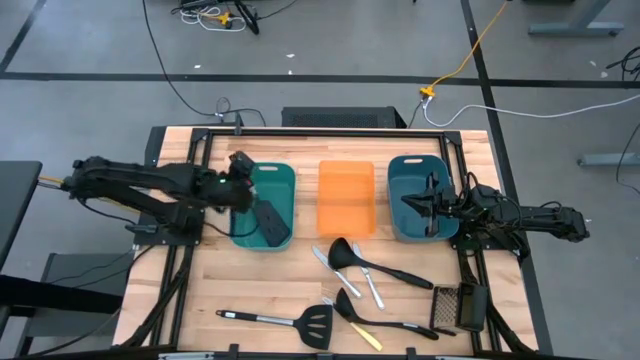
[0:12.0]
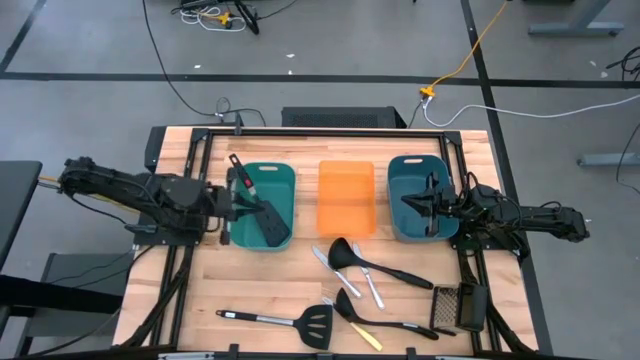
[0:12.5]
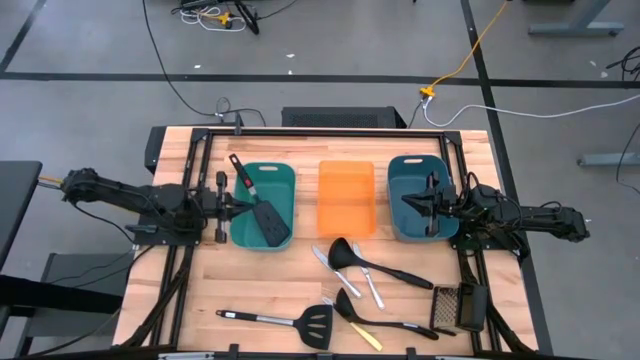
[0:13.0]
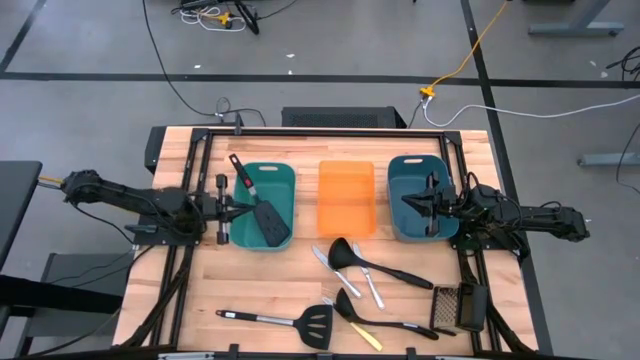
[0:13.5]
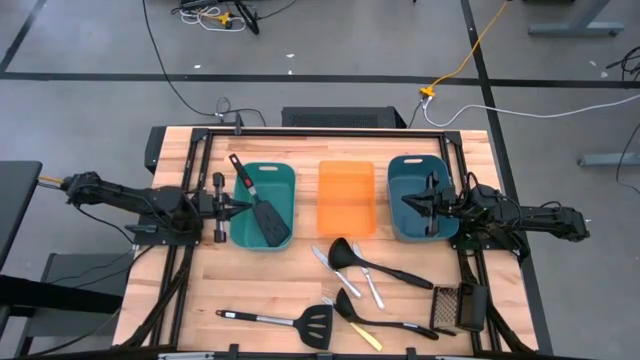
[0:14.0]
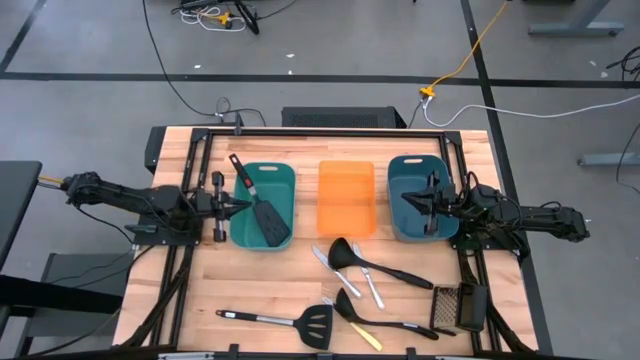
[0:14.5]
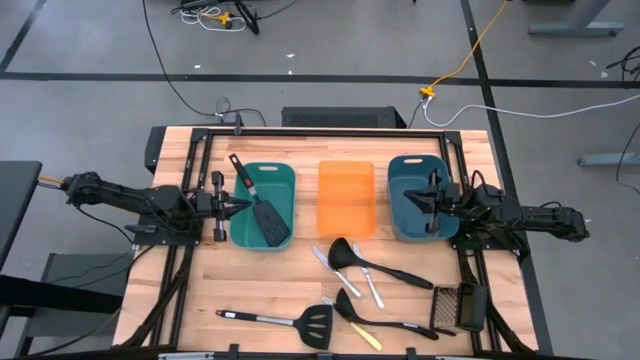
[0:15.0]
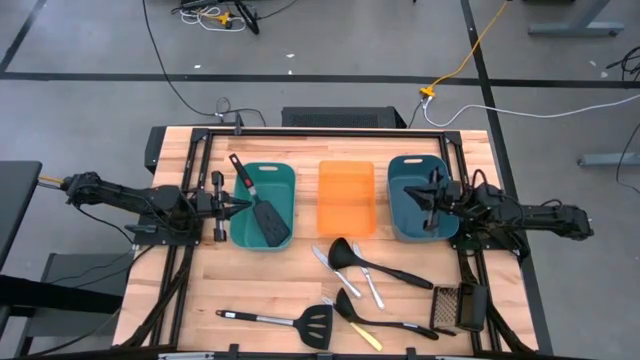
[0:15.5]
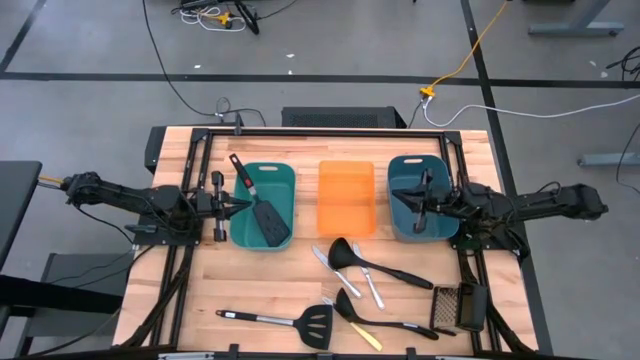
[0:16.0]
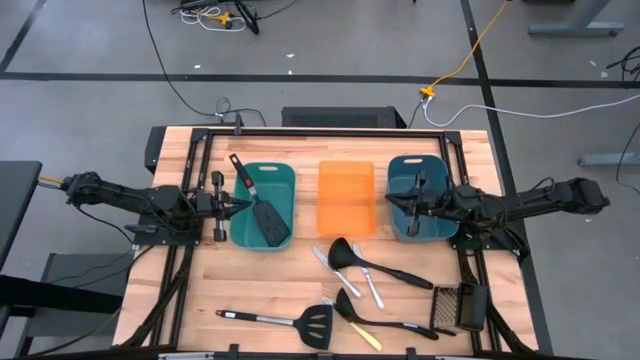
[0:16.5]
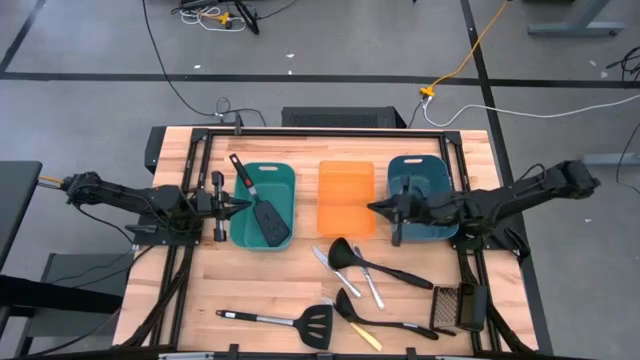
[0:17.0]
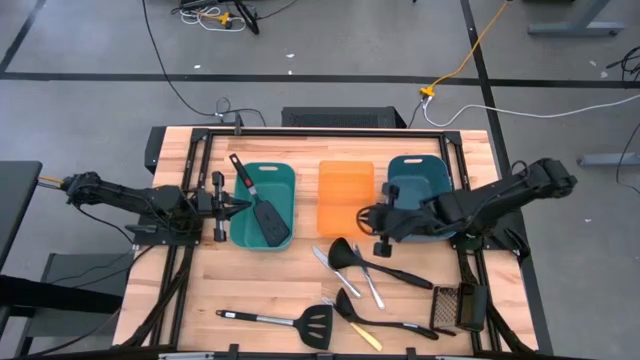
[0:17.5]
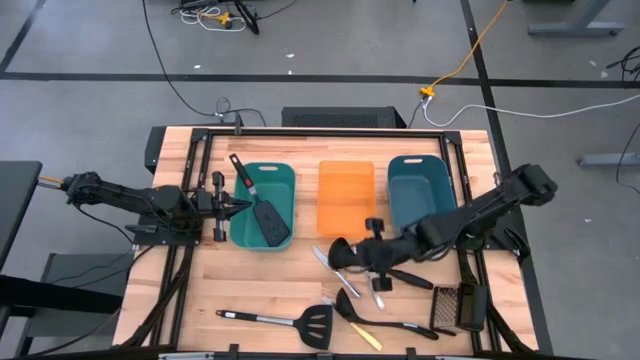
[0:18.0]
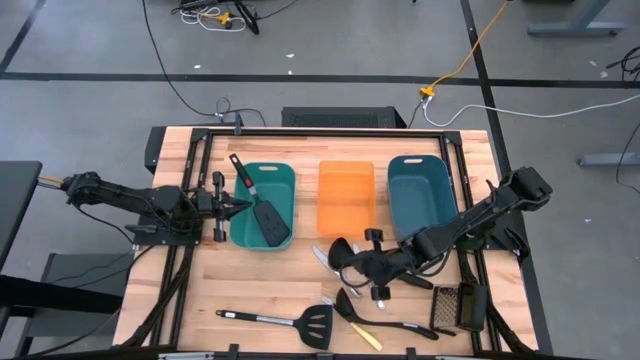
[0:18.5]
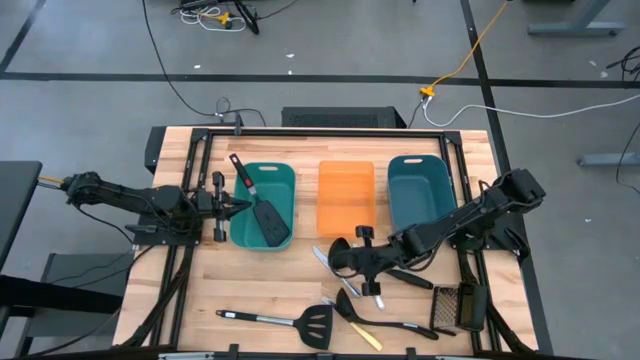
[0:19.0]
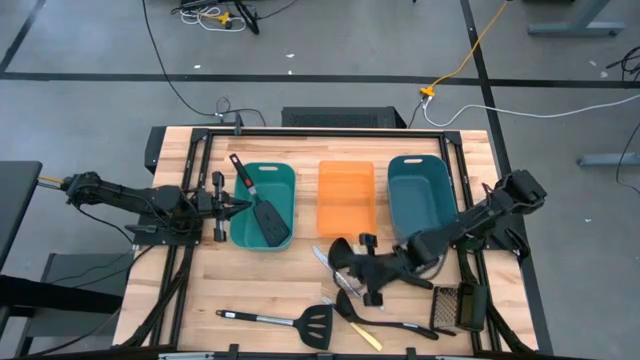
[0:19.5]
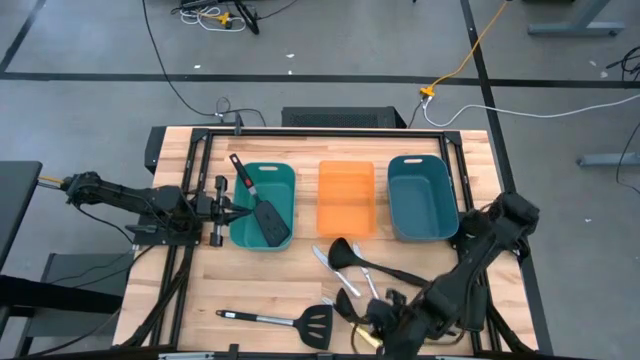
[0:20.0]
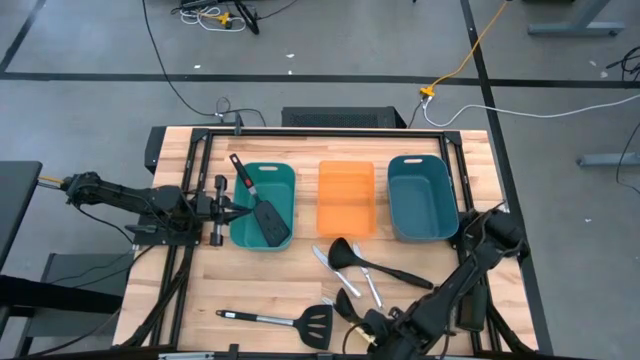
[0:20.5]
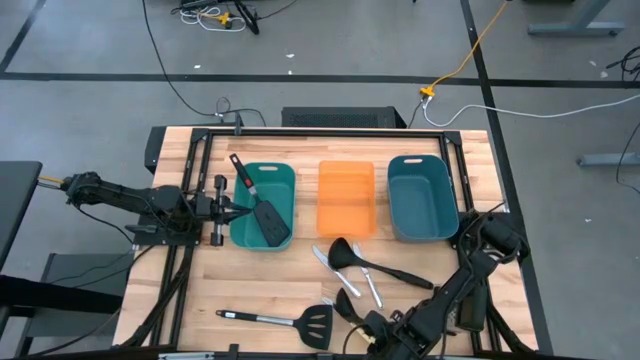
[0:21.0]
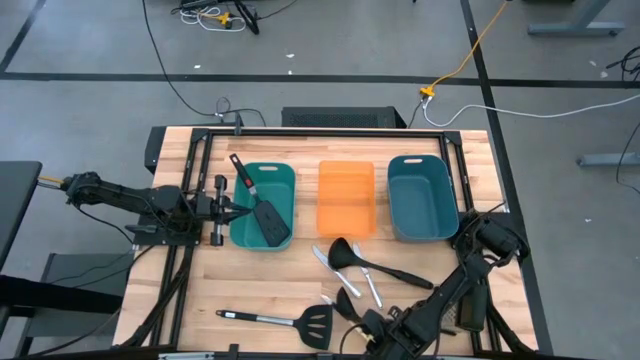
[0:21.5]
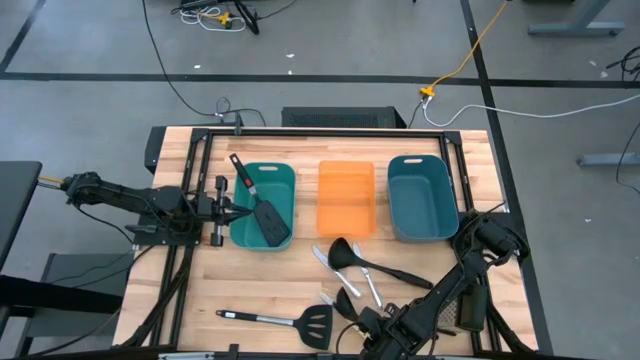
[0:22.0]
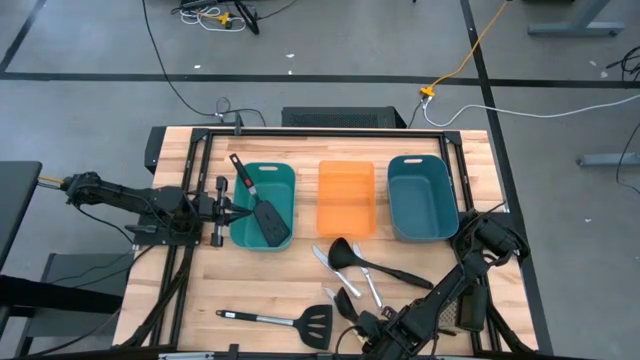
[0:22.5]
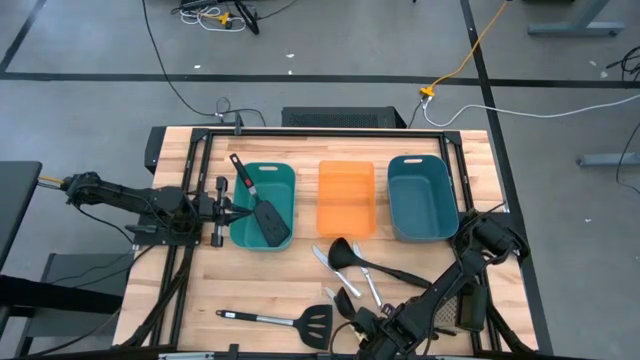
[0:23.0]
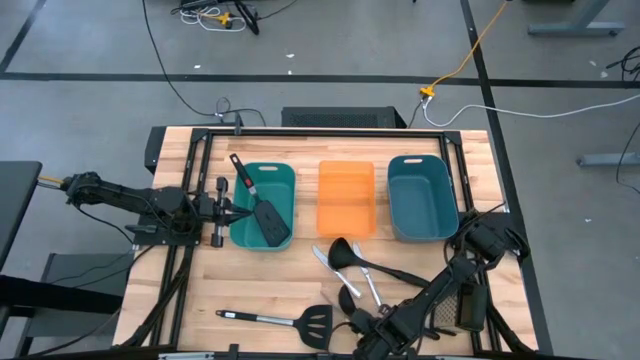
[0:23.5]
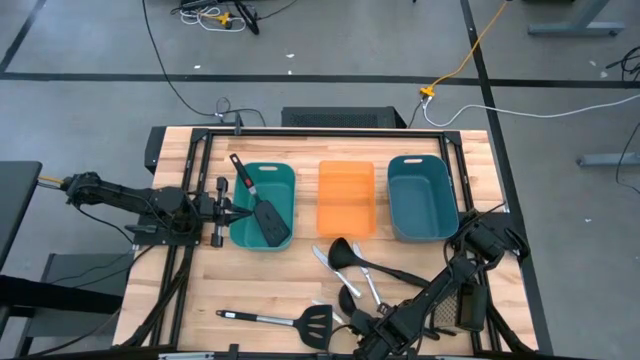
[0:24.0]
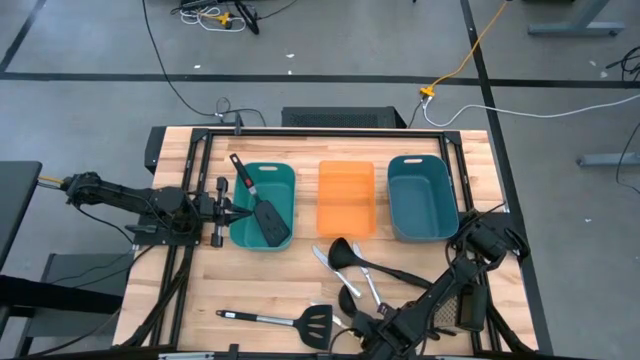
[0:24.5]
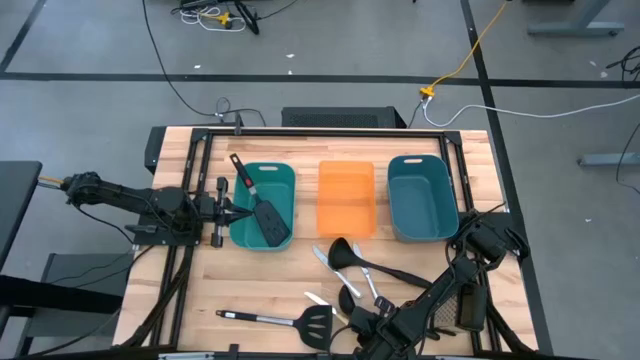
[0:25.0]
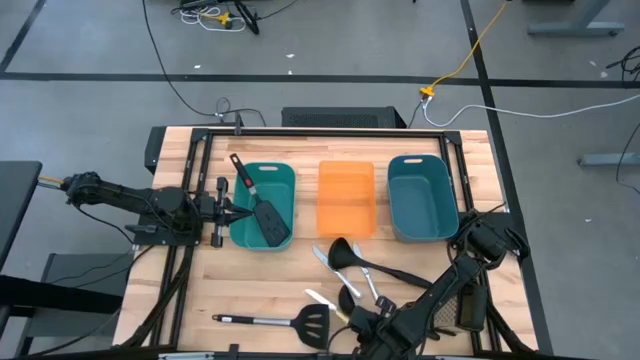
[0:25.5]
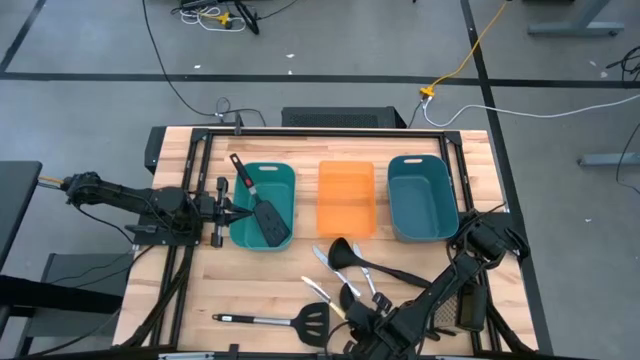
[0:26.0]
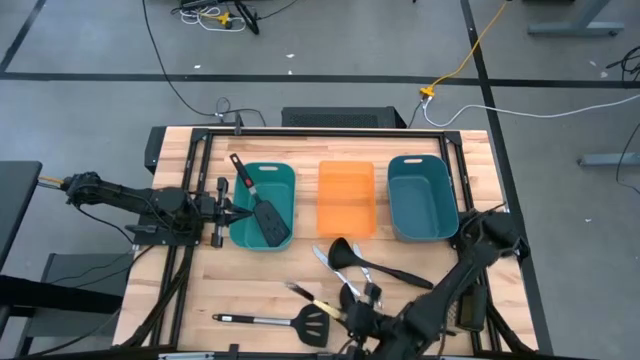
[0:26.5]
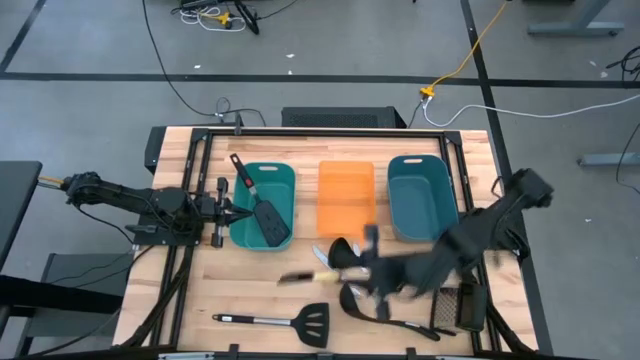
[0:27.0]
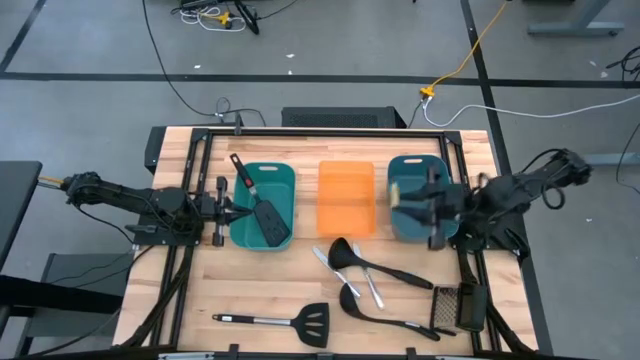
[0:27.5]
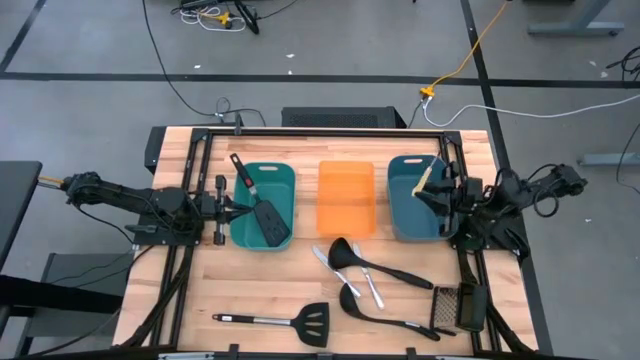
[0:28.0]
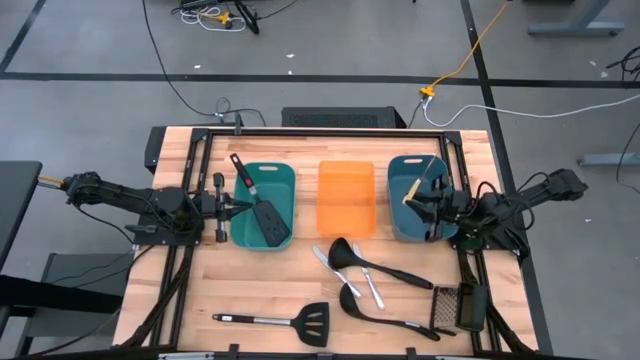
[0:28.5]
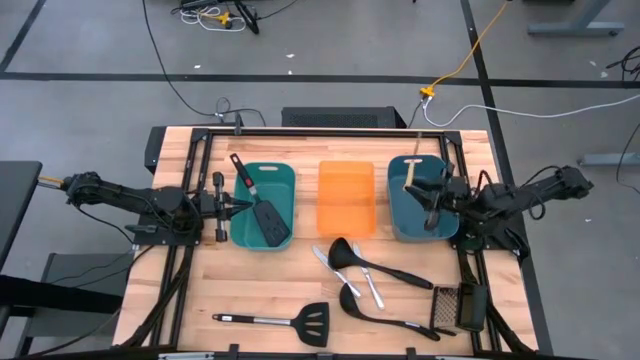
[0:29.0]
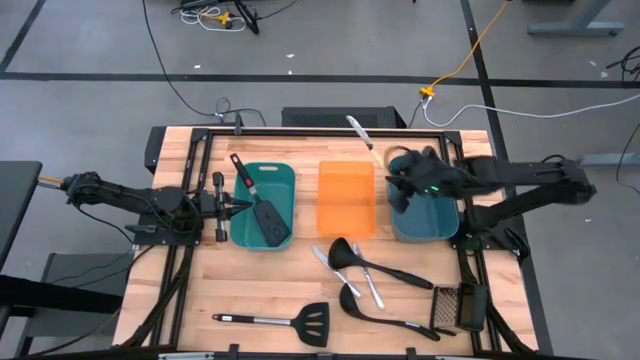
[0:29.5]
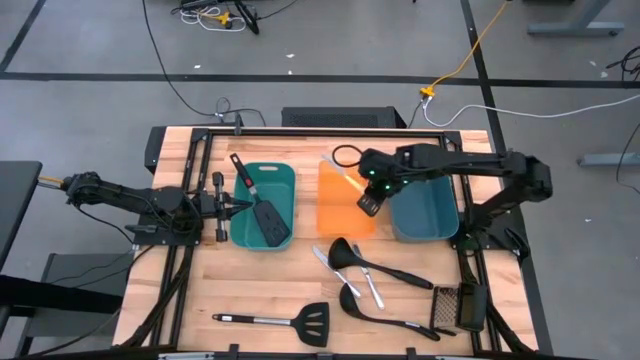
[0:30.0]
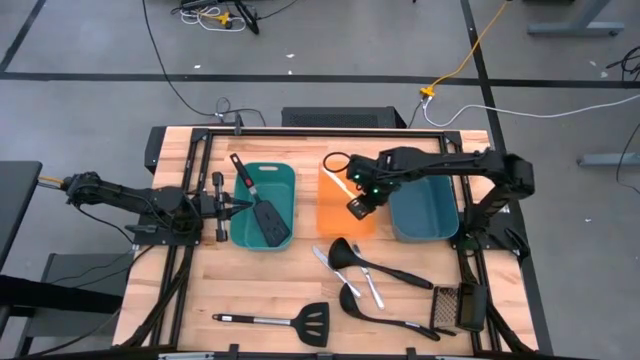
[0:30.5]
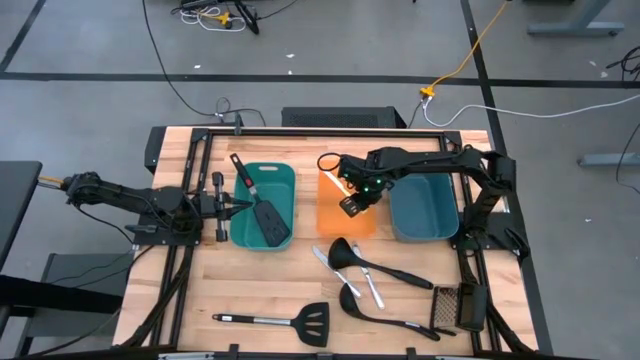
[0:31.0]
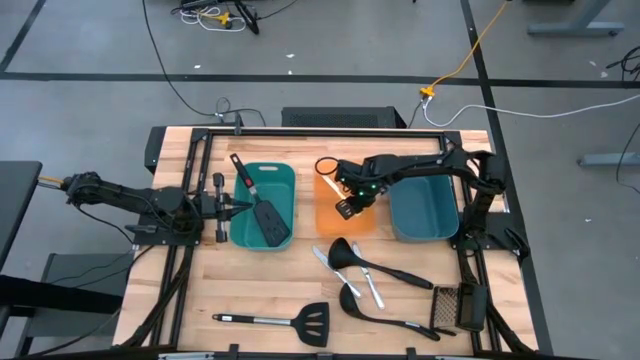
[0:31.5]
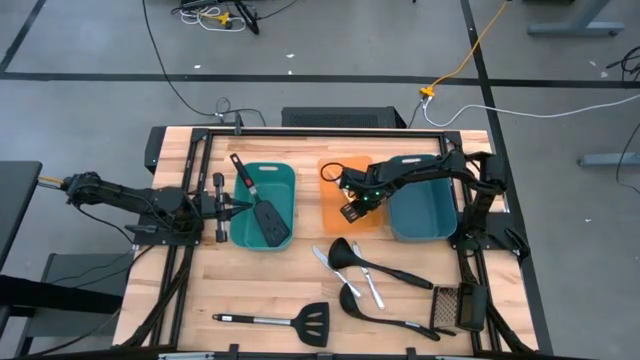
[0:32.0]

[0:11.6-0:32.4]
Task: Pick & Place Kitchen Items
Put the yellow table knife into the orange bin
